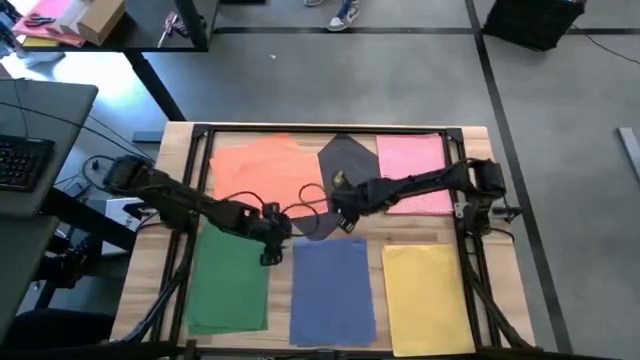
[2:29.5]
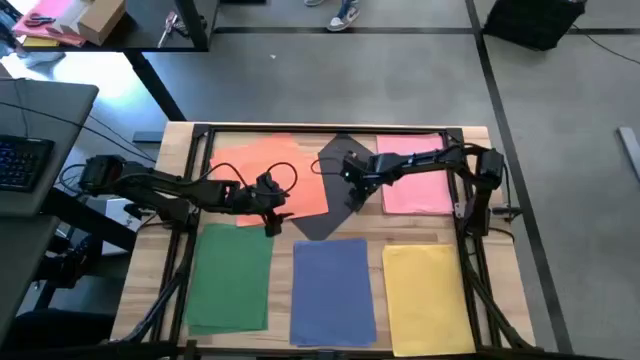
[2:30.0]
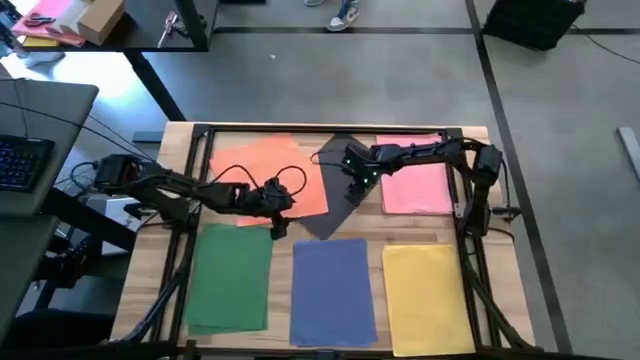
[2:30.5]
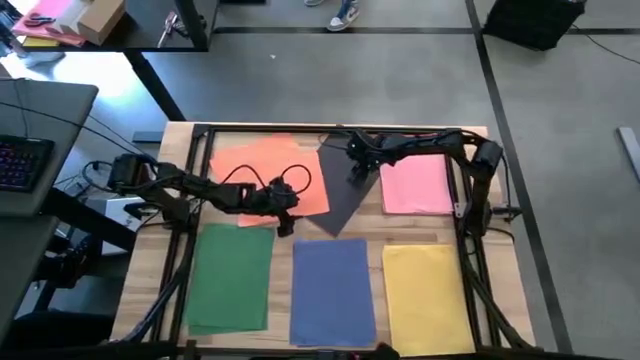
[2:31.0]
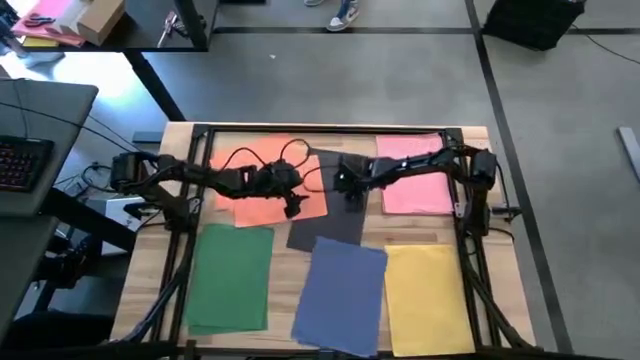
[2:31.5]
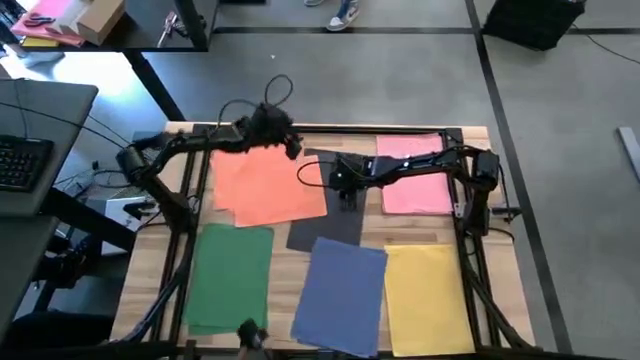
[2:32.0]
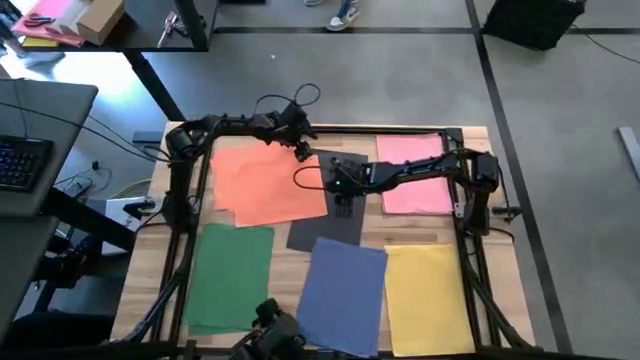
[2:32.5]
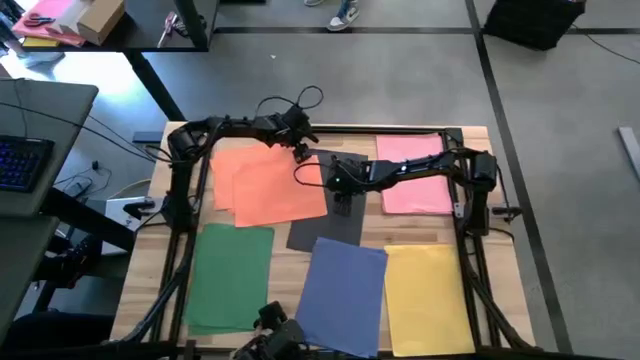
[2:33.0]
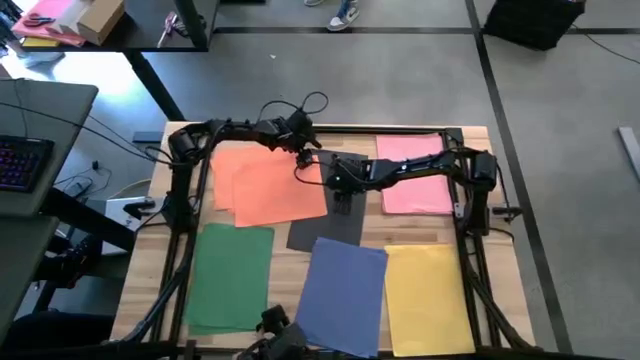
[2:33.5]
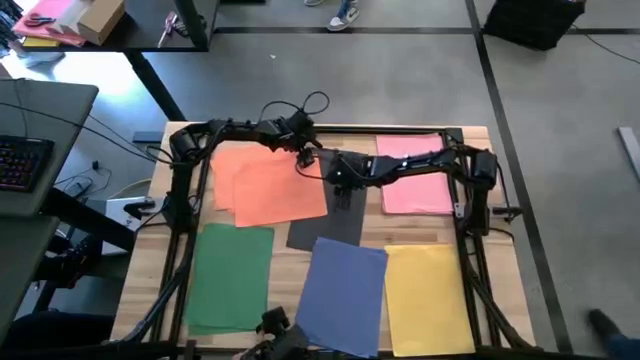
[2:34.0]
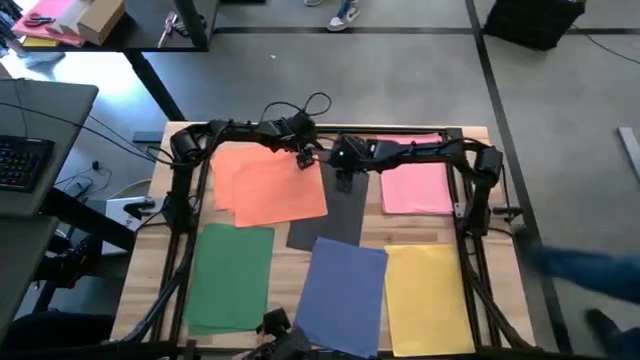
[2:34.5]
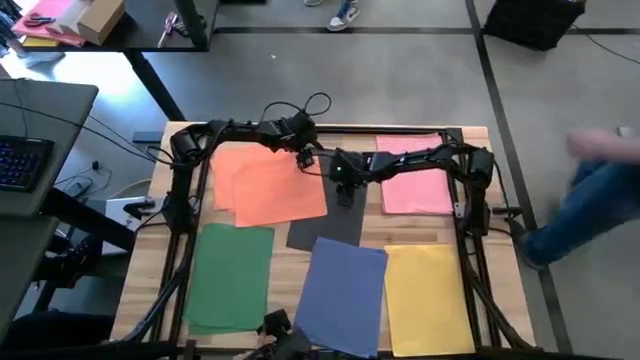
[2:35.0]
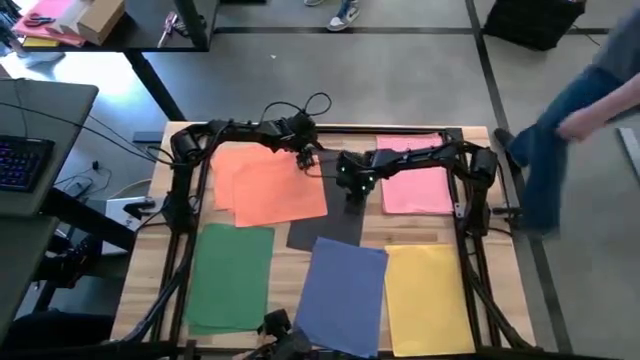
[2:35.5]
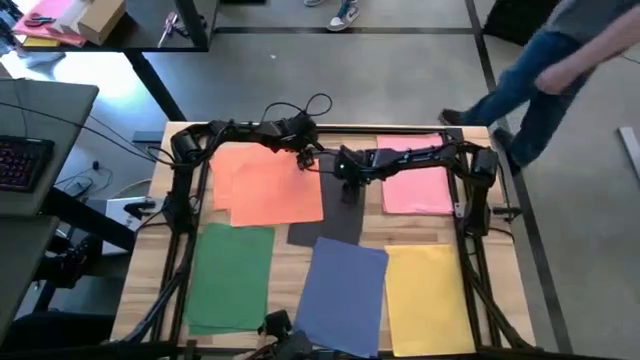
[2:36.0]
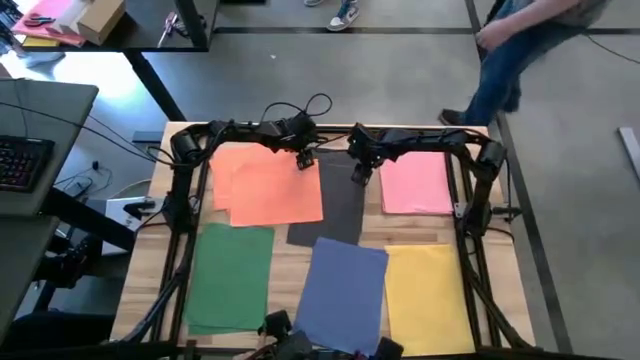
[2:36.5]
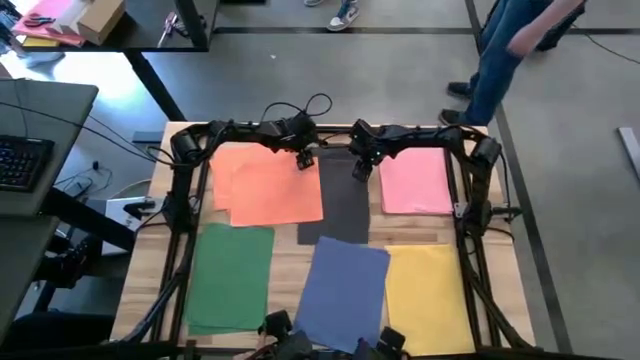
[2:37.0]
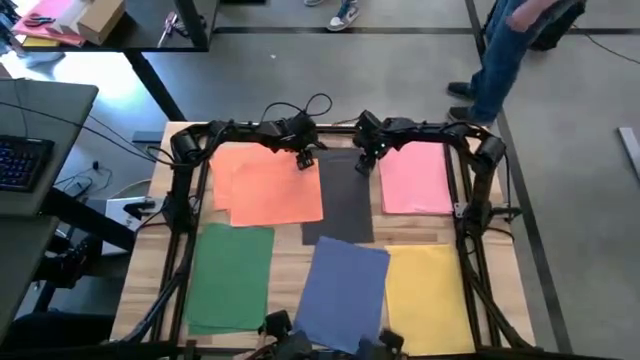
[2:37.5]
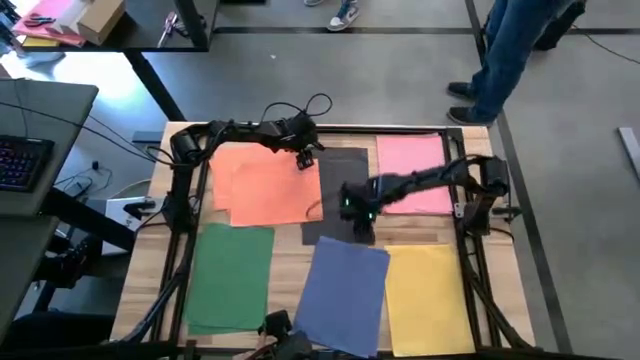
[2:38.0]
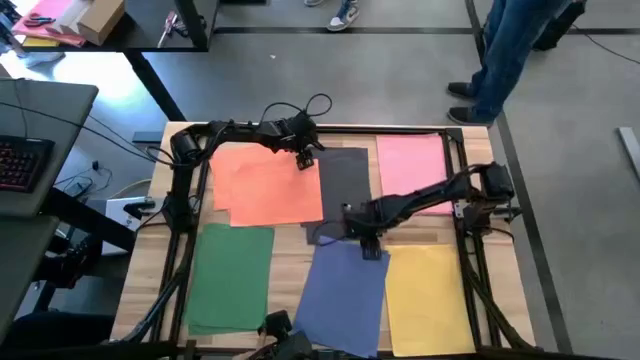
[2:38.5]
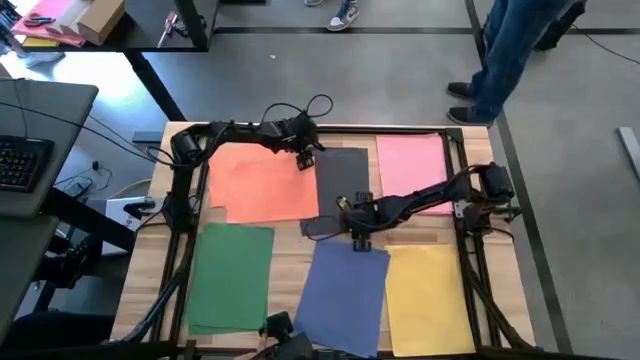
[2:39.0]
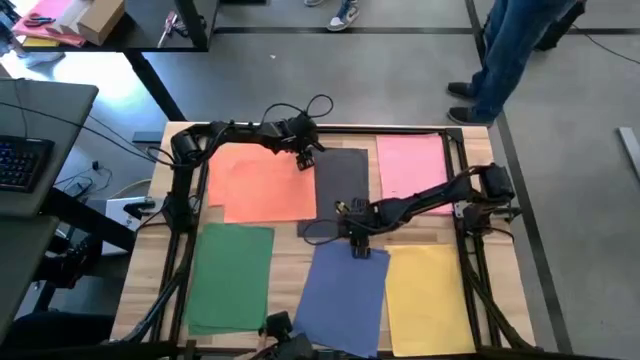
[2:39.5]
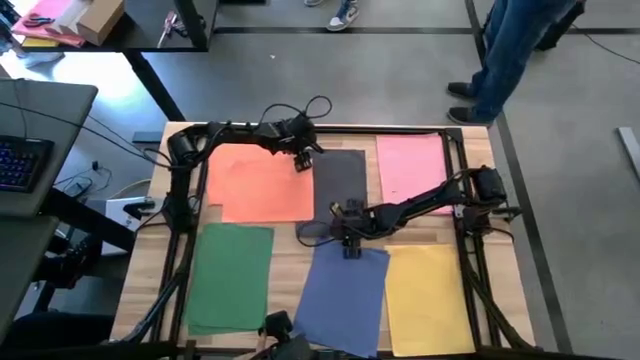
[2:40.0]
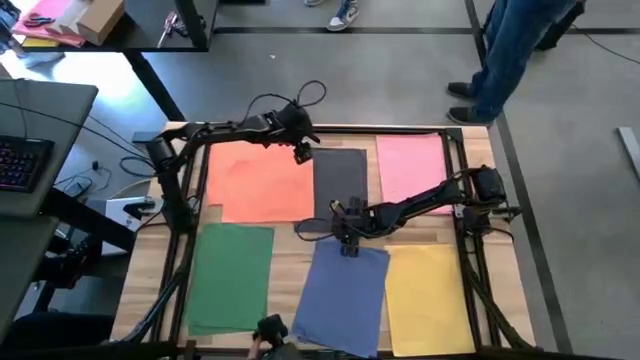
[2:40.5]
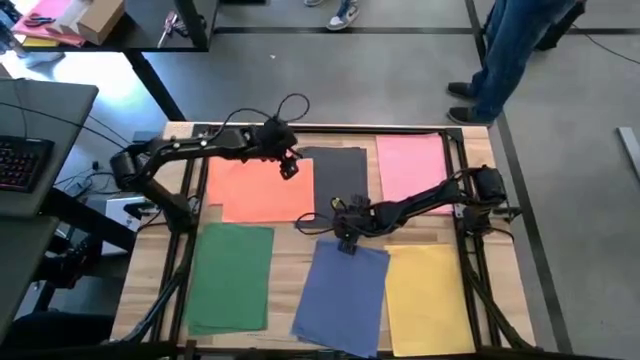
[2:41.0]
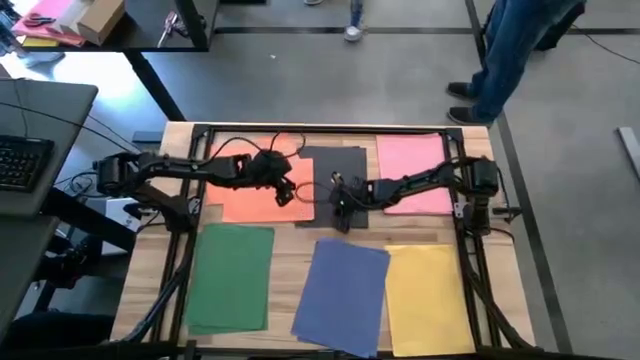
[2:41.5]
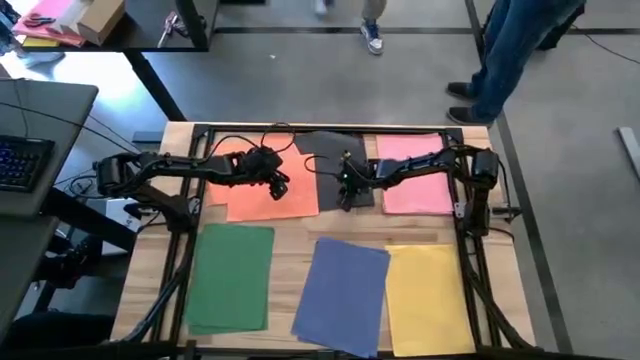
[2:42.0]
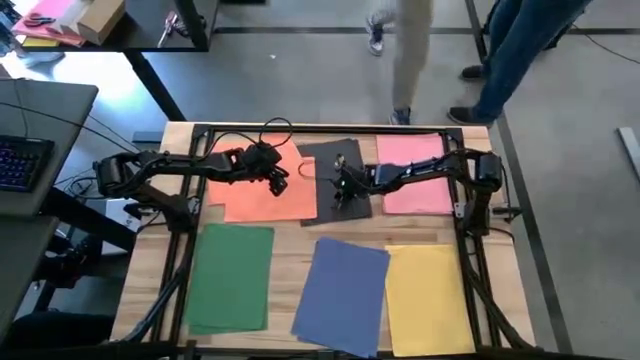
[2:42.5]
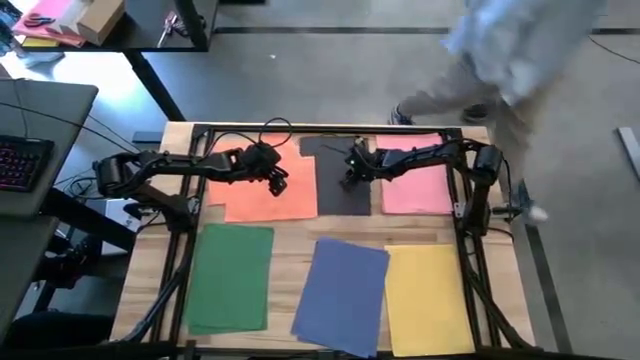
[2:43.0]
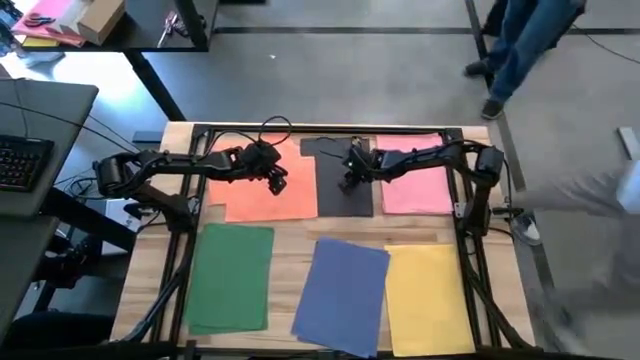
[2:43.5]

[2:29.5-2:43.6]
Task: Organize paper
Adjust the black papers on the top middle of the table

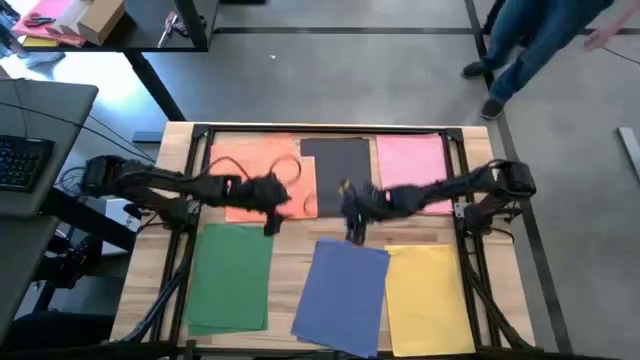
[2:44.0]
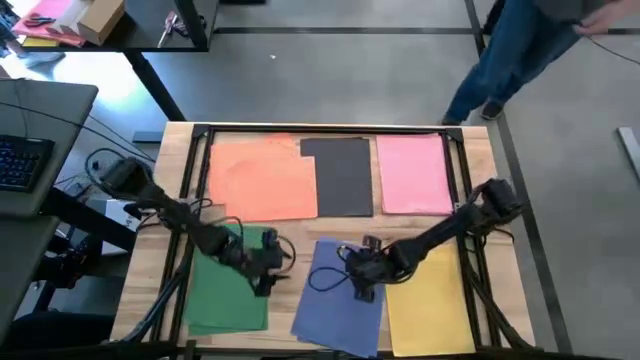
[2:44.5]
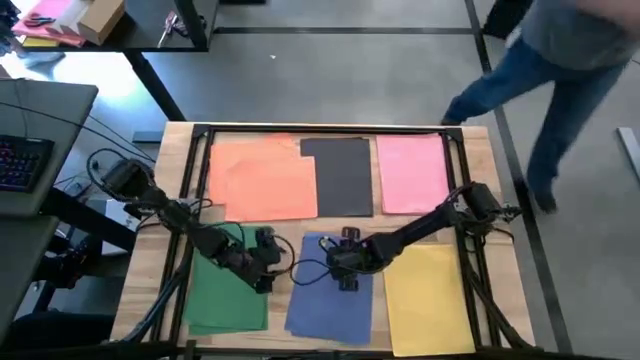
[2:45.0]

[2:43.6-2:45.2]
Adjust the blue papers on the bottom middle of the table

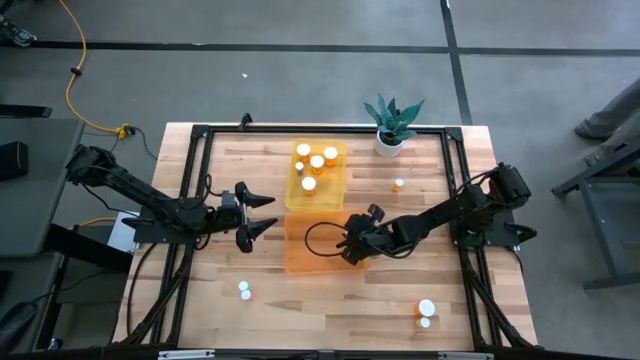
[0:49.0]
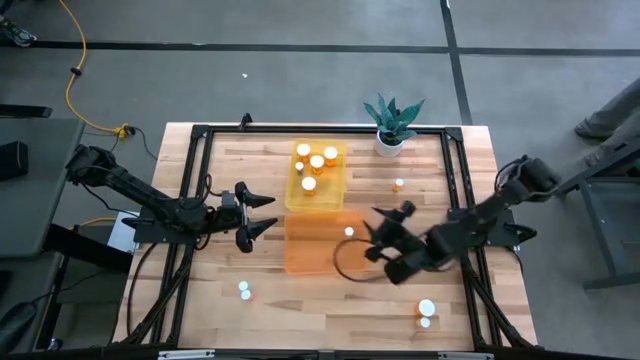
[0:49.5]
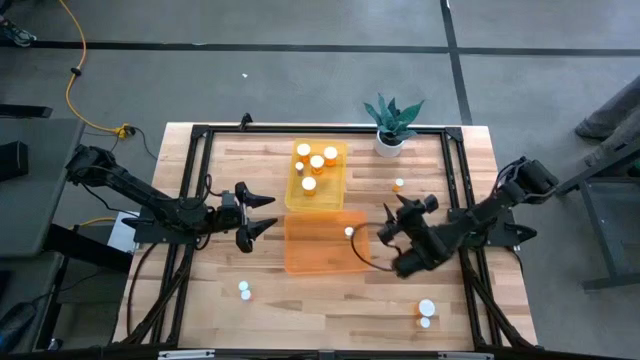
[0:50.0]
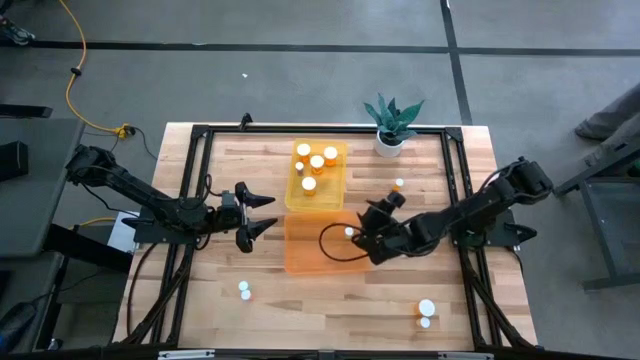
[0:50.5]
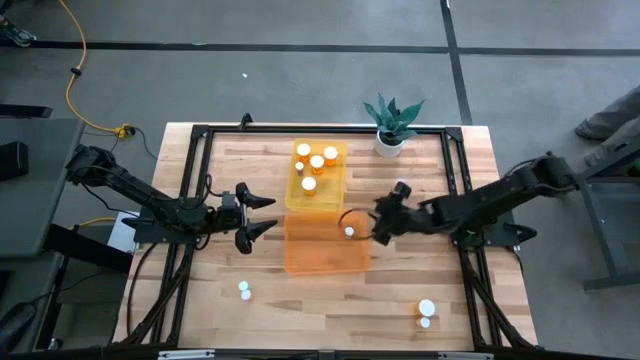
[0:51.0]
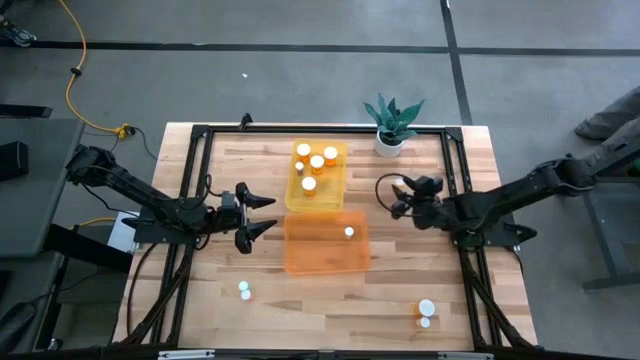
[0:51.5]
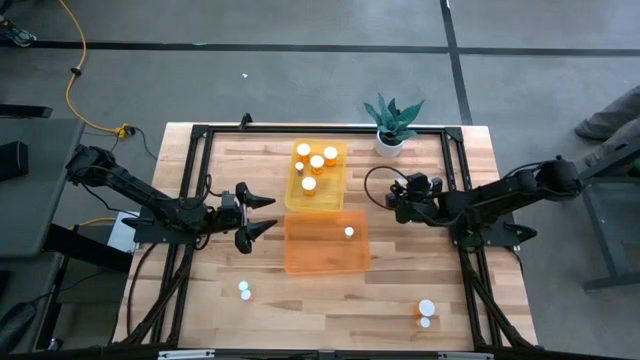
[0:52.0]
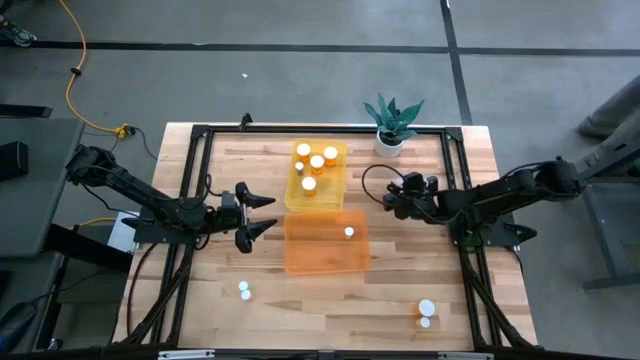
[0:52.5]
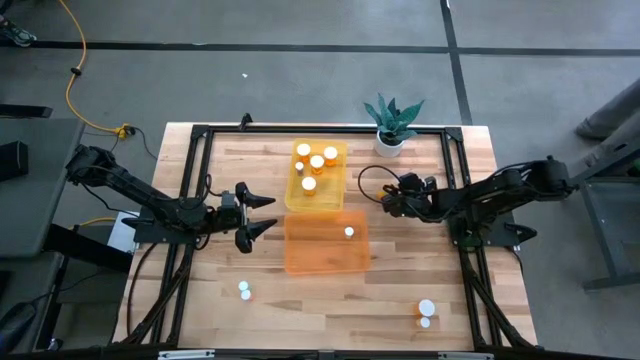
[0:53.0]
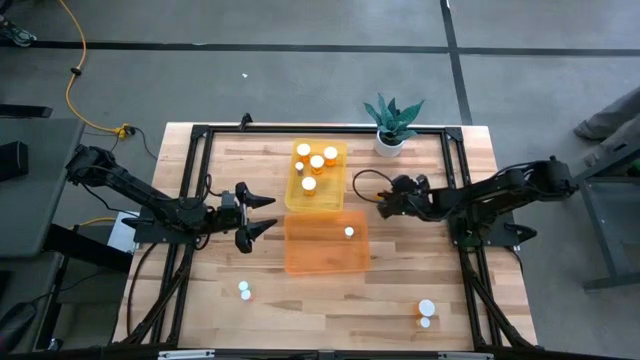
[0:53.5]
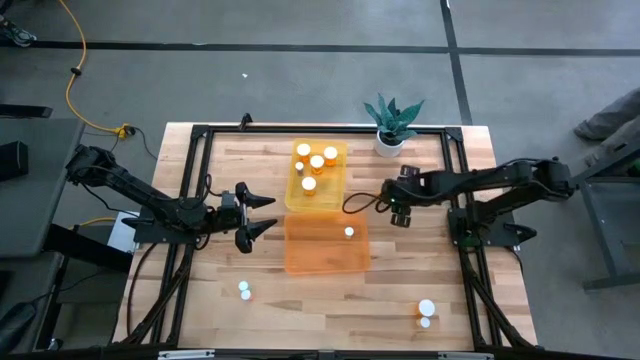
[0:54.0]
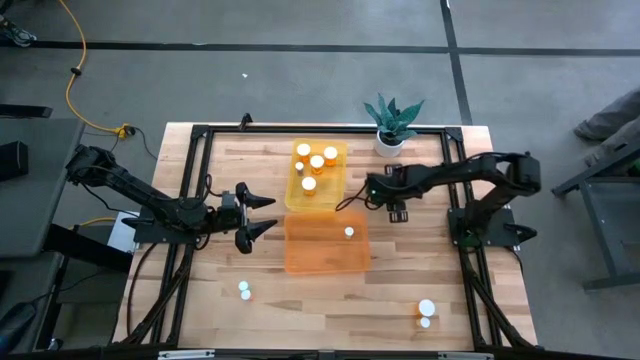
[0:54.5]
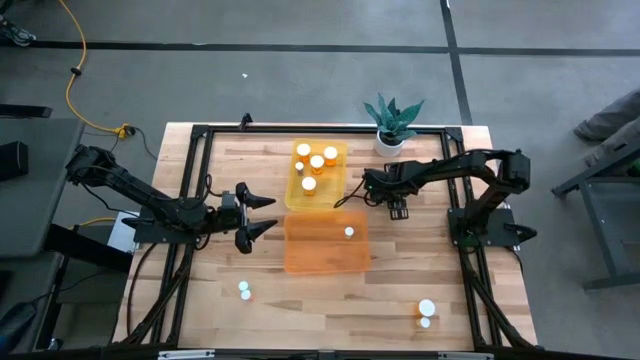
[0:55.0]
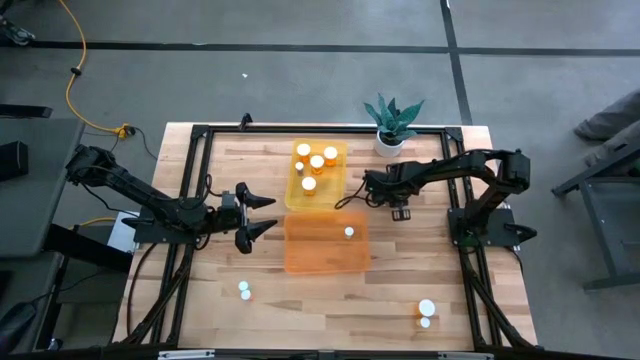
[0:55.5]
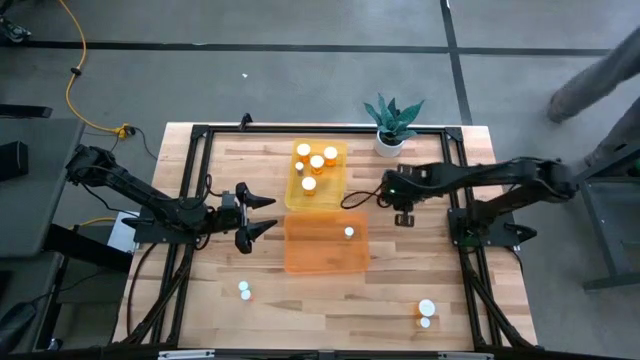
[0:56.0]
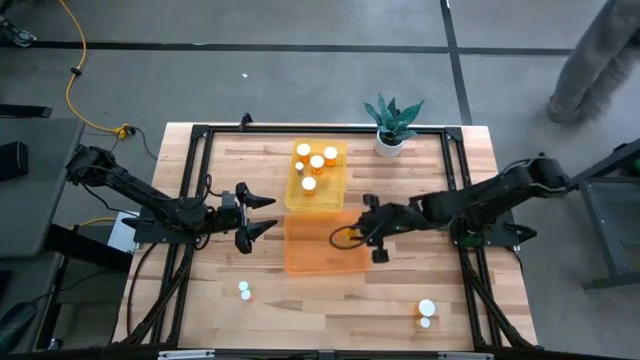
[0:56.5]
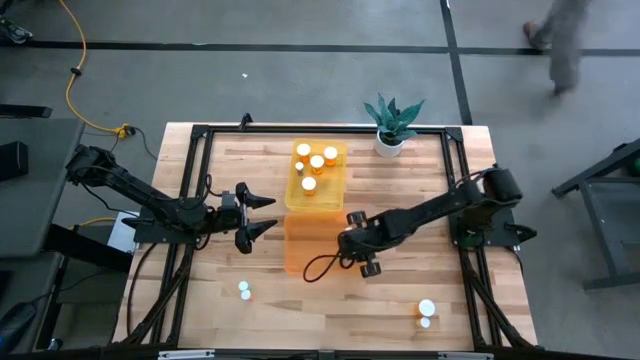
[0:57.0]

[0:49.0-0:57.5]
Task: Pick and place medicine bottles into bin by pill shape (circle, oval)
Put the orange tablet bottle into the orange bin
